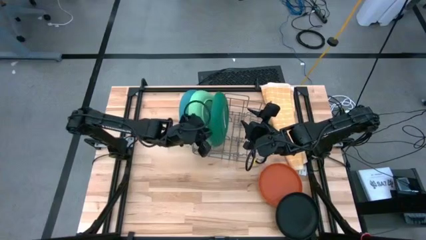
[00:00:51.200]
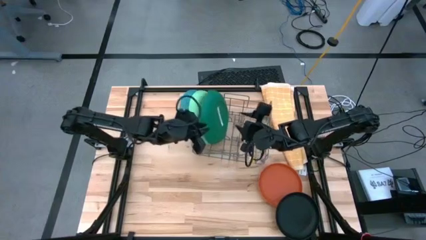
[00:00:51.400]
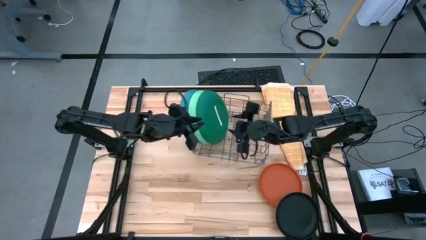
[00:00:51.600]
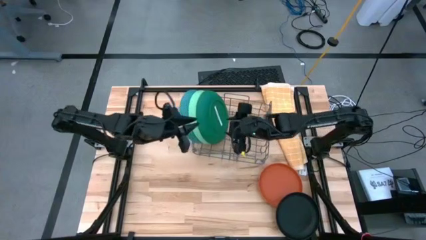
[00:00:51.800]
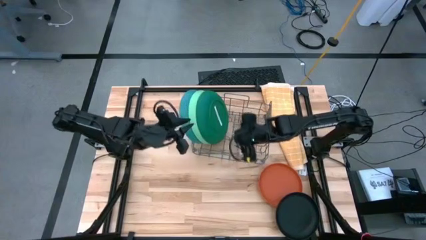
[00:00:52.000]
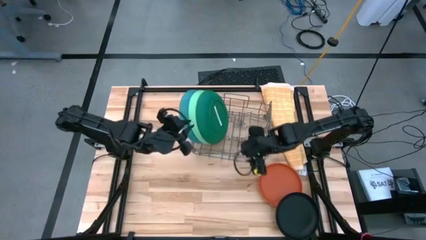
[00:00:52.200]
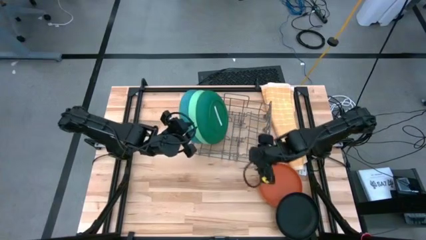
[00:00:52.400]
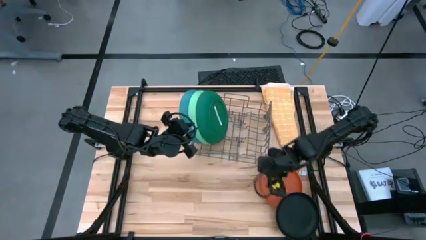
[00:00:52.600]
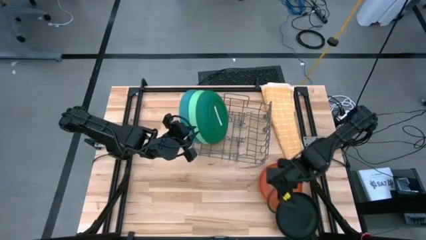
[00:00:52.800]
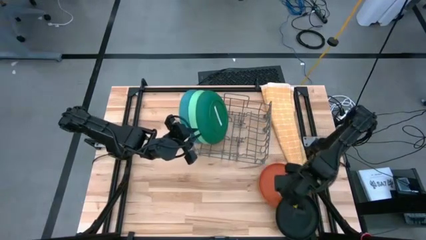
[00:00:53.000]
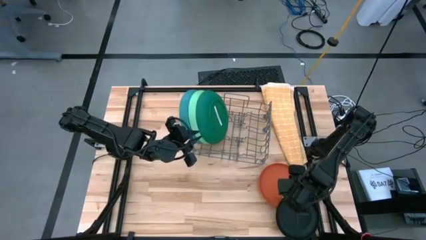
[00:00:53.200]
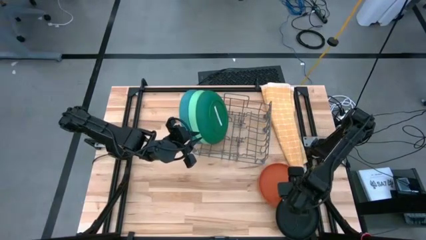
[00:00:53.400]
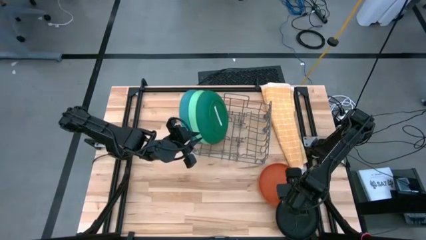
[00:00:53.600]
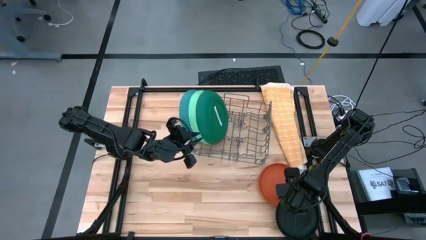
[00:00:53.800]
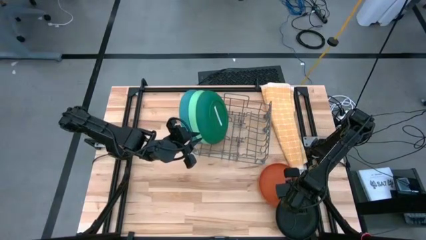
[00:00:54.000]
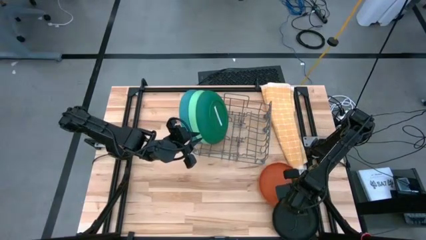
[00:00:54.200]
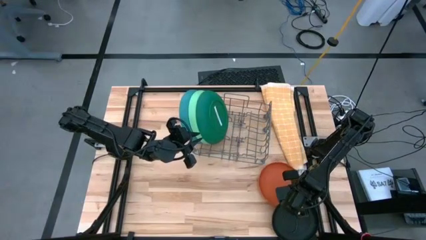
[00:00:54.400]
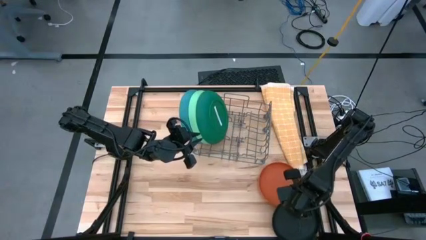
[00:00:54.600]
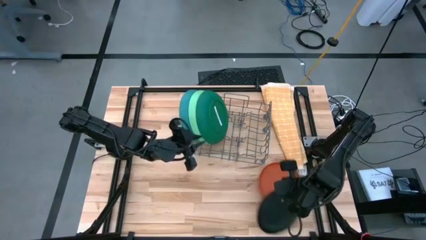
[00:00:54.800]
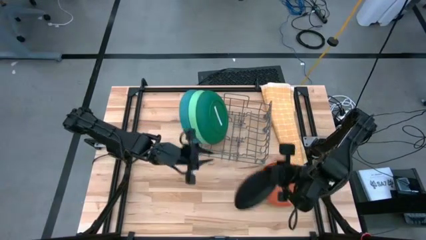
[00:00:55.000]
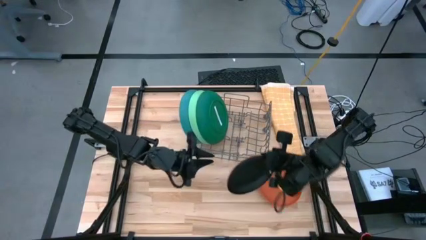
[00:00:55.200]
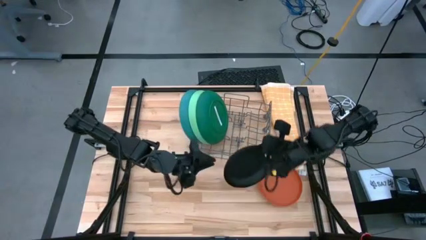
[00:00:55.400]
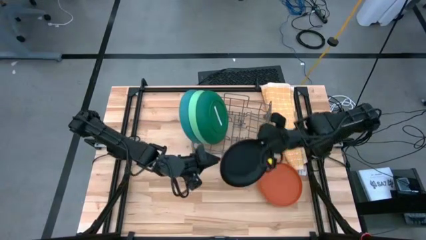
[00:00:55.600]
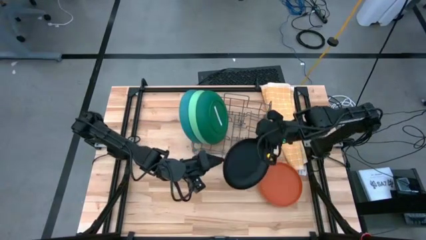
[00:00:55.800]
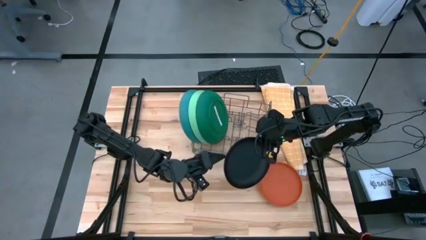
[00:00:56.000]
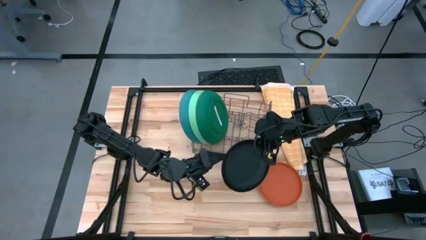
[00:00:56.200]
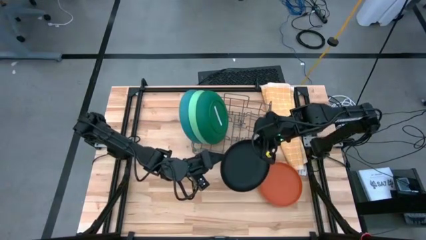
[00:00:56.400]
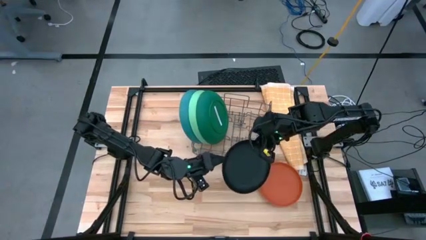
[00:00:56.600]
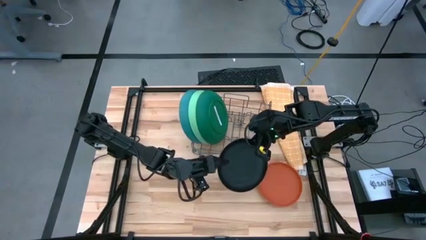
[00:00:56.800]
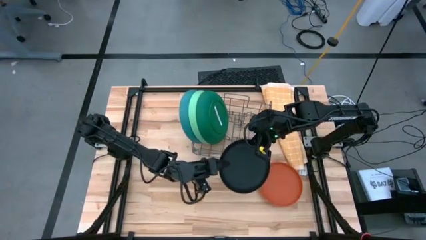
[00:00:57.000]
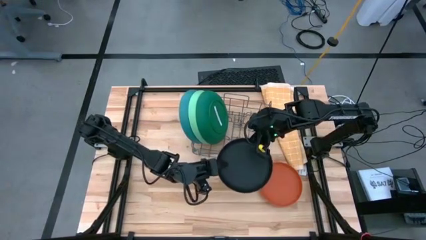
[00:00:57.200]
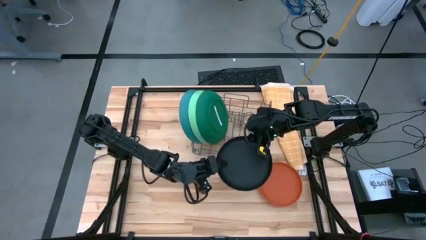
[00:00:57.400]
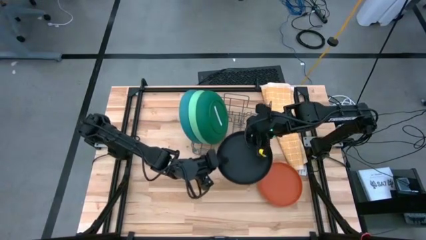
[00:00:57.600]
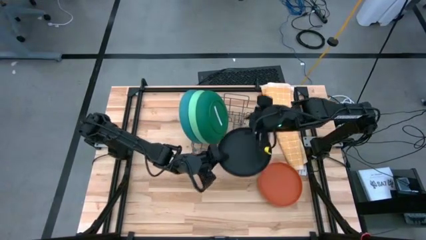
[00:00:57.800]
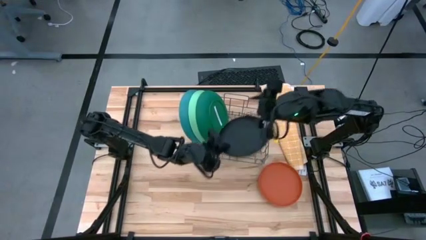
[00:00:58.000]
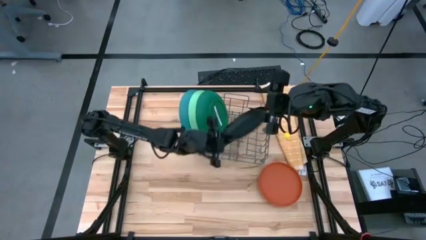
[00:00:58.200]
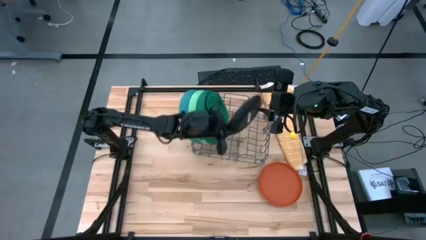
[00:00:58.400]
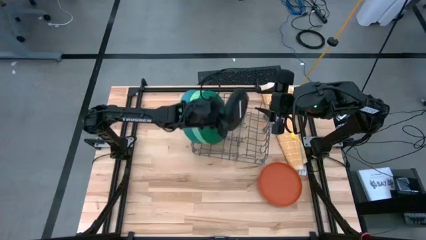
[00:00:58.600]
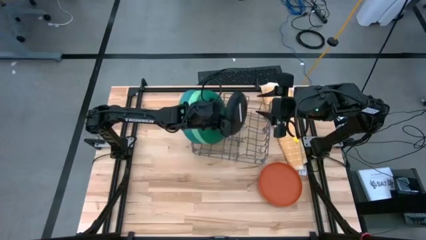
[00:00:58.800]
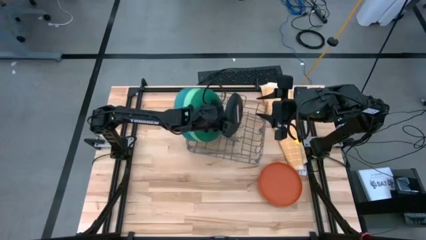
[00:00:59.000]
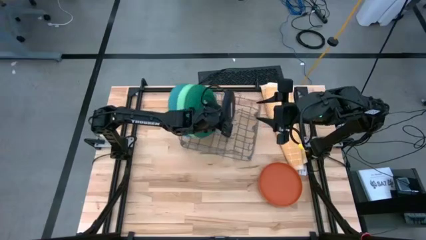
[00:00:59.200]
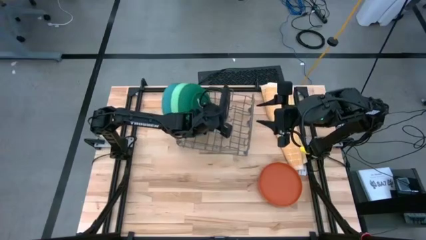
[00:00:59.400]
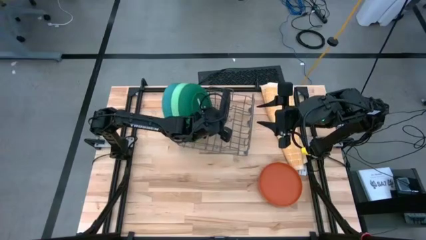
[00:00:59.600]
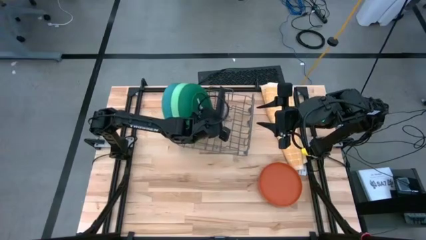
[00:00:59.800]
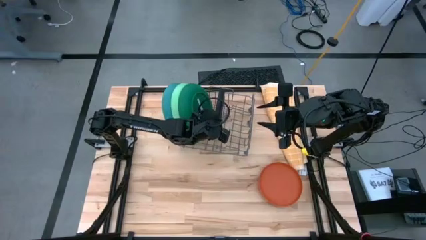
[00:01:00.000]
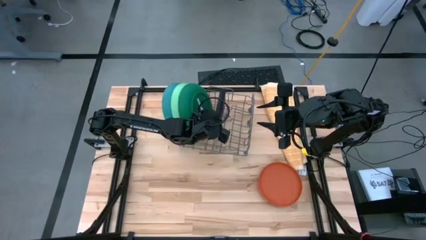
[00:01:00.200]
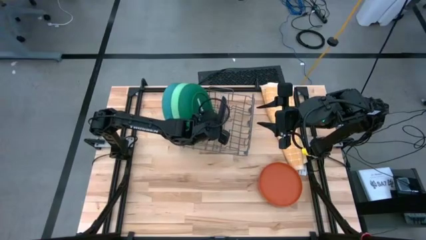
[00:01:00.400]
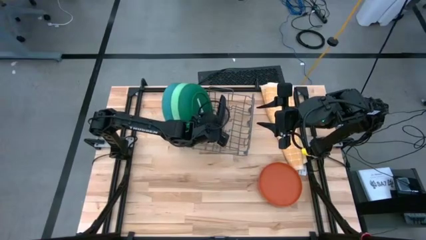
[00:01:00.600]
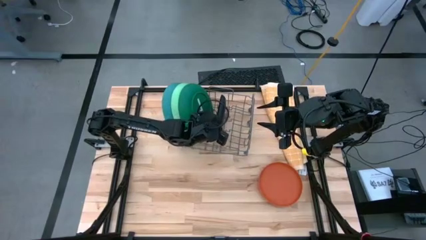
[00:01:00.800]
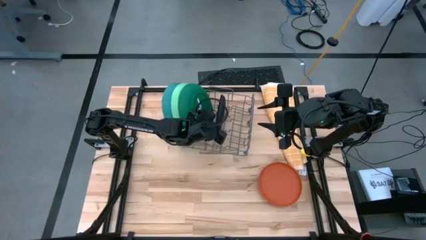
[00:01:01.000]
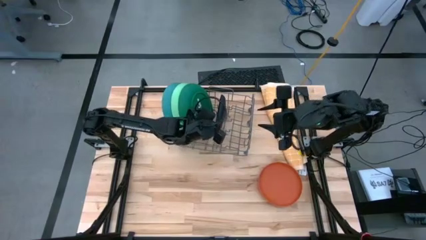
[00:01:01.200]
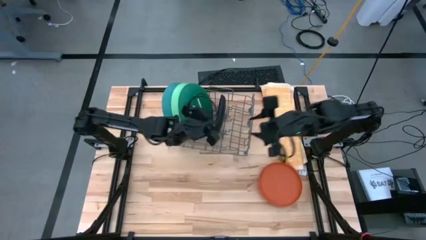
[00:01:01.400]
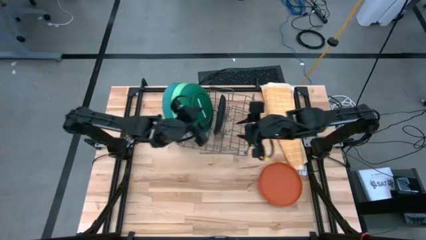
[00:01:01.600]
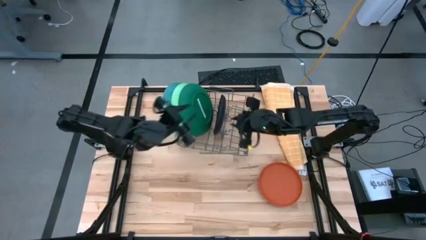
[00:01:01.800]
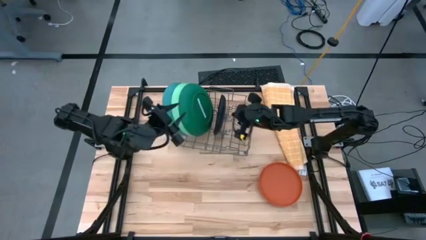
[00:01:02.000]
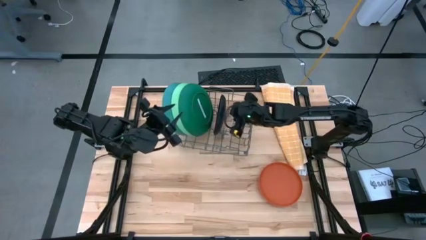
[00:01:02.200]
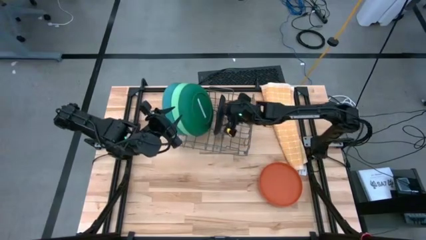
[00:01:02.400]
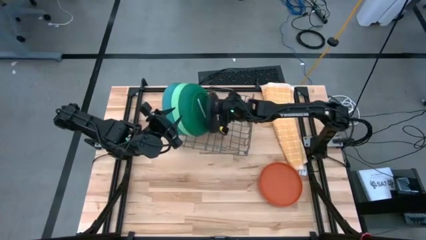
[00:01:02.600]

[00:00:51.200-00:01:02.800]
Task: Sort dishes
Put the black plate in the dishwasher rack
